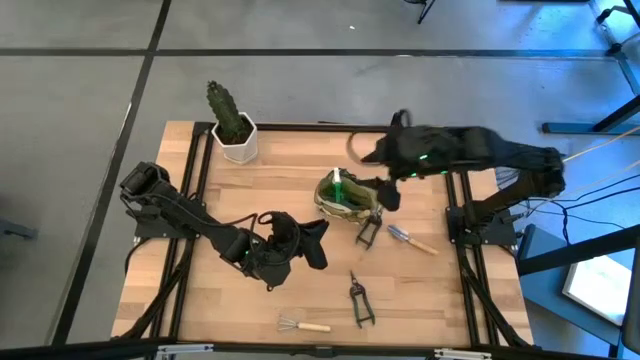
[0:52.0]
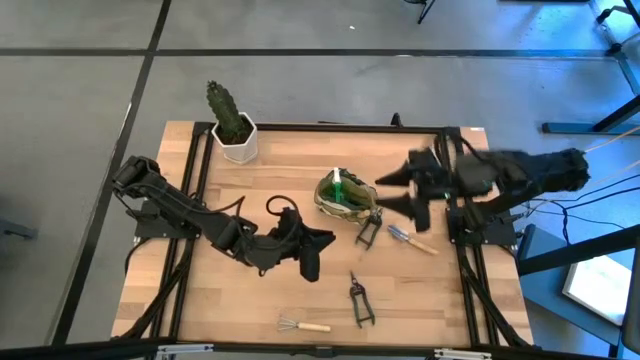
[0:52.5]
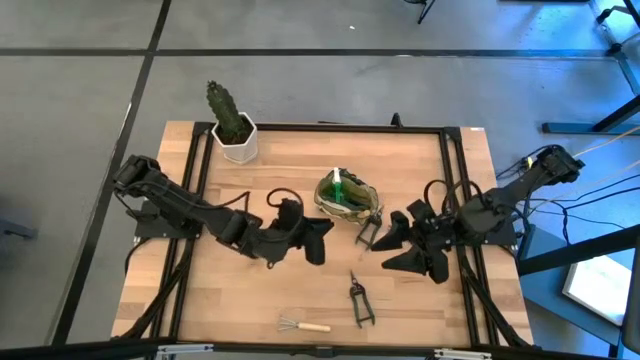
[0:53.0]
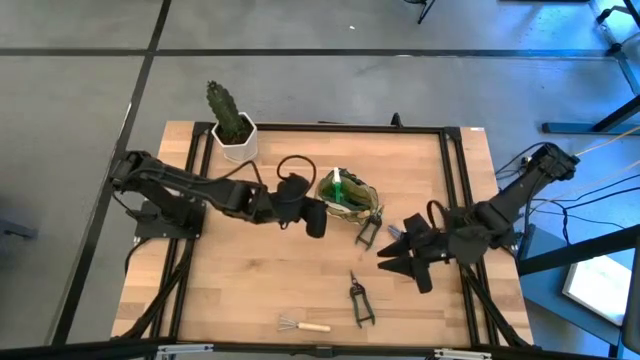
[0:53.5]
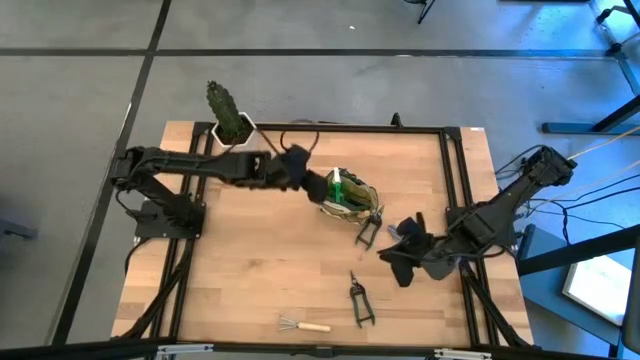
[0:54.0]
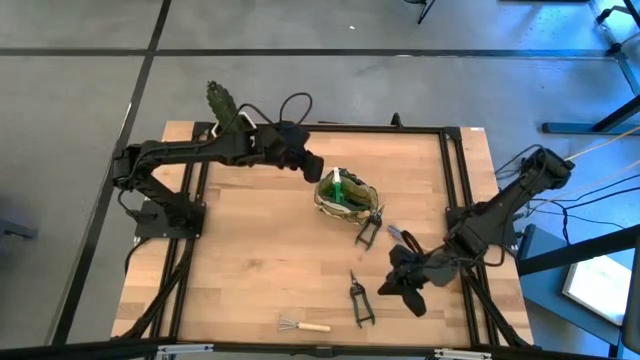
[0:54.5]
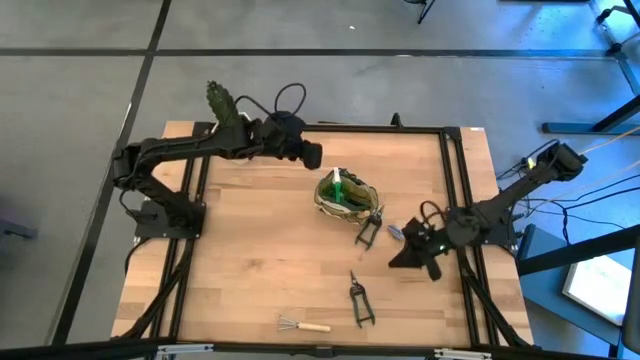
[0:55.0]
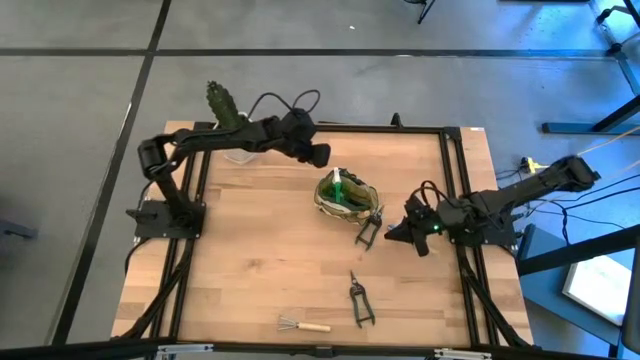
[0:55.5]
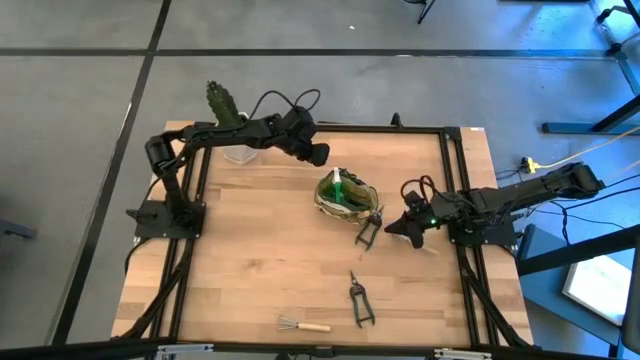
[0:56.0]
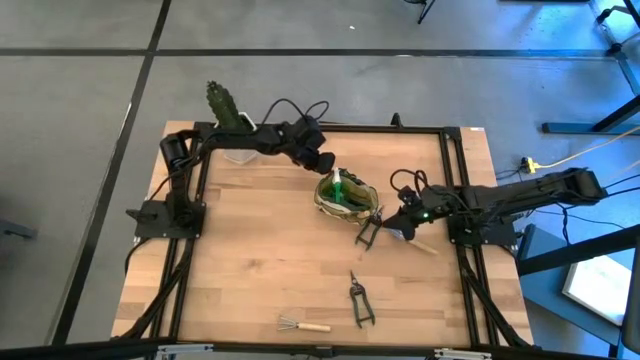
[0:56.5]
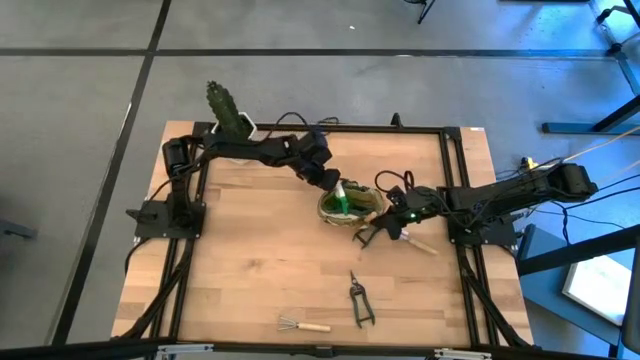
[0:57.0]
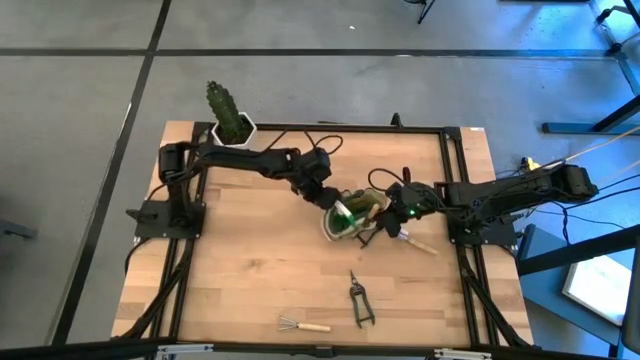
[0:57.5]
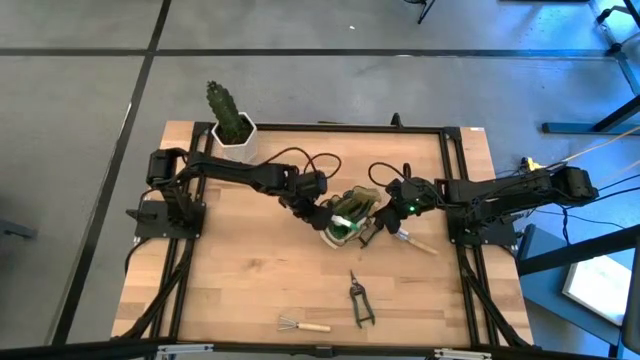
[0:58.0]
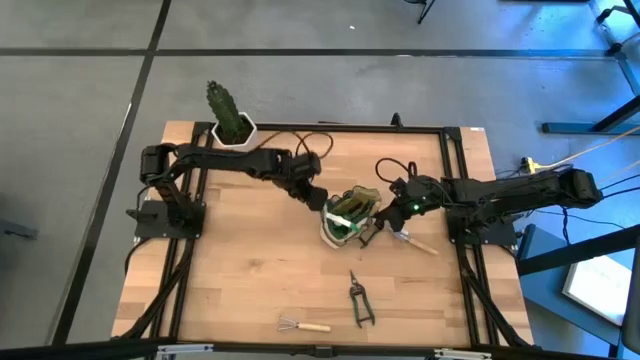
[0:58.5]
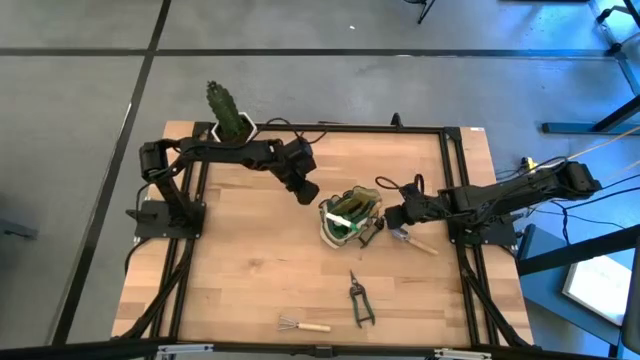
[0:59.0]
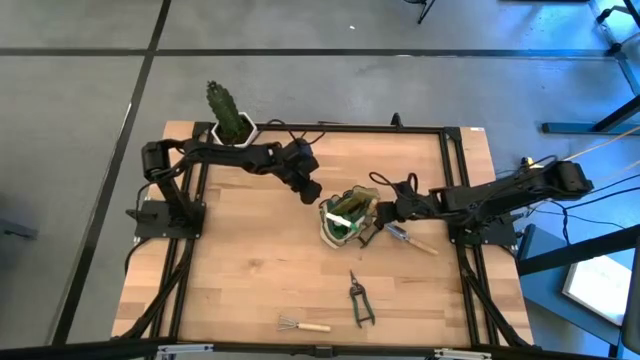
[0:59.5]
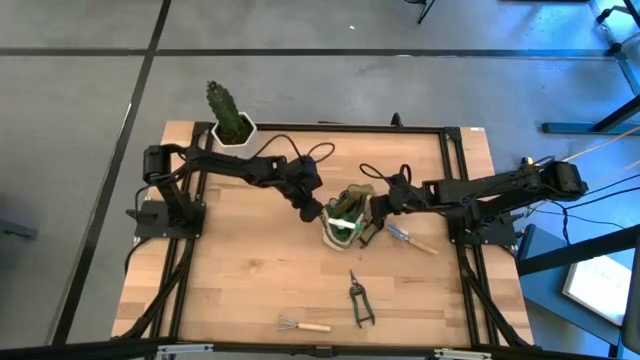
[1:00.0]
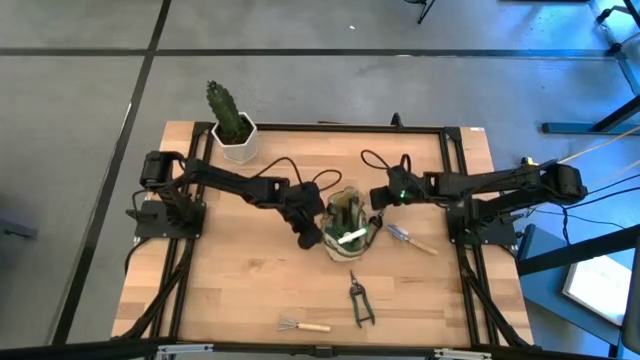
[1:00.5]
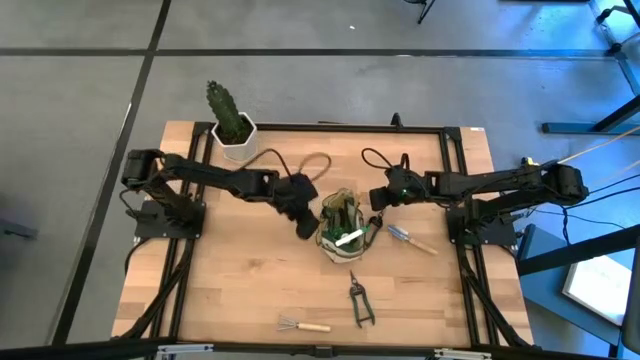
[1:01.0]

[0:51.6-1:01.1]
Task: Pick & Place Garden tools in Gardening bag
Adjust the gardening bag

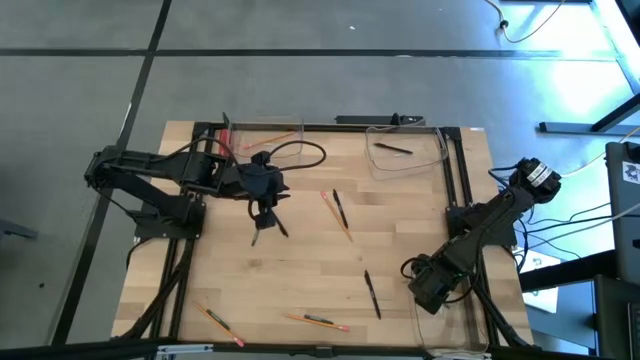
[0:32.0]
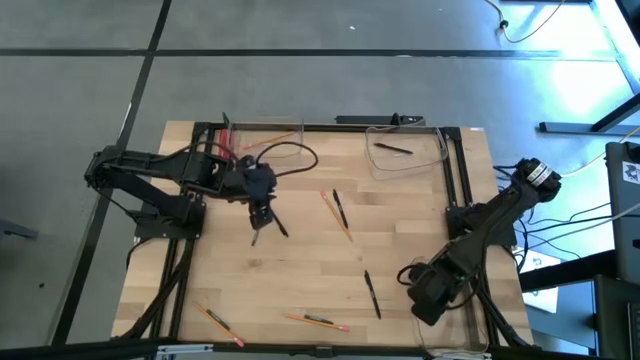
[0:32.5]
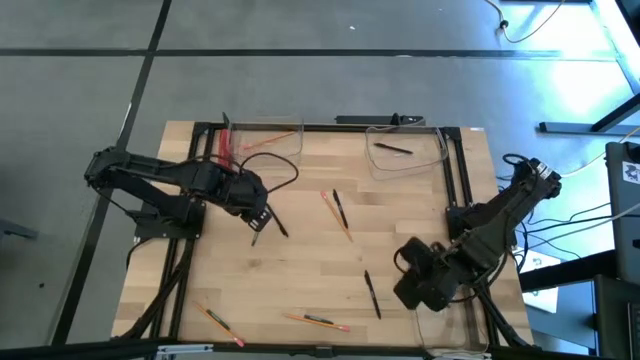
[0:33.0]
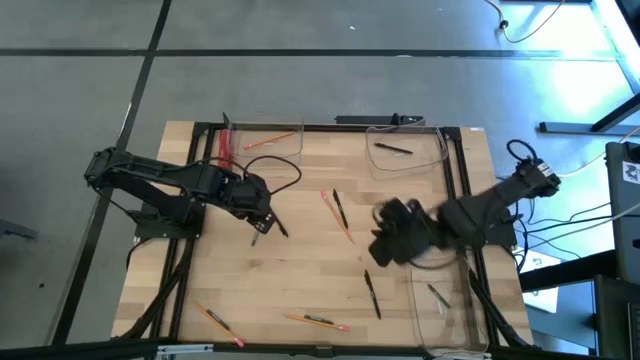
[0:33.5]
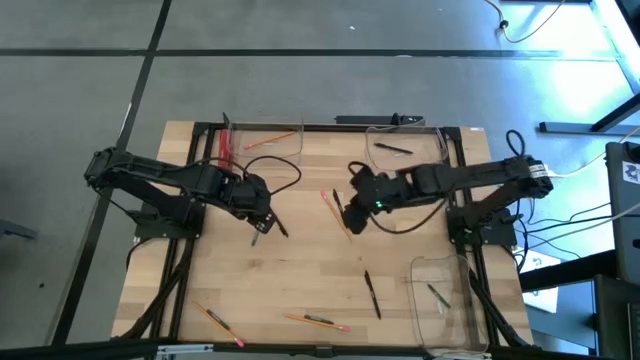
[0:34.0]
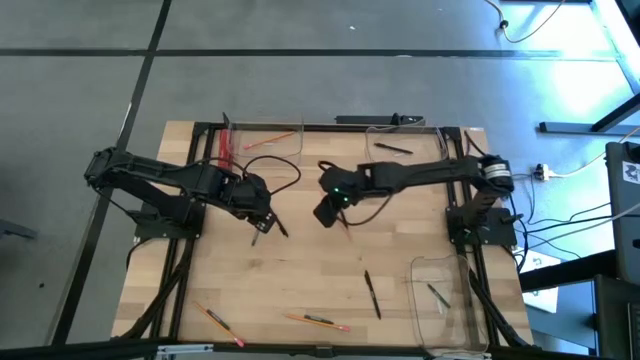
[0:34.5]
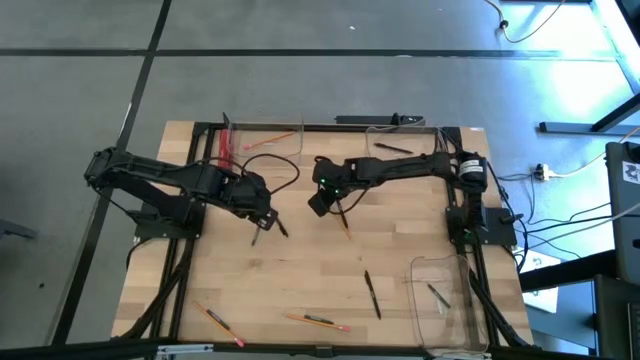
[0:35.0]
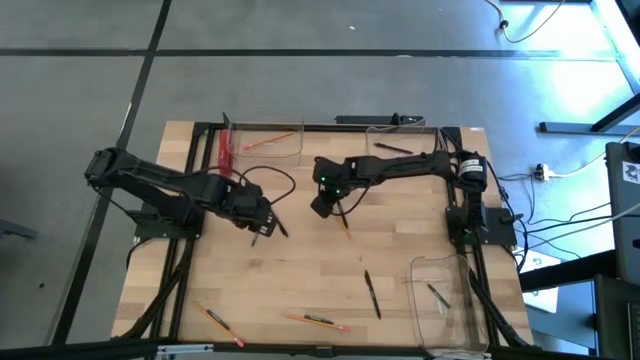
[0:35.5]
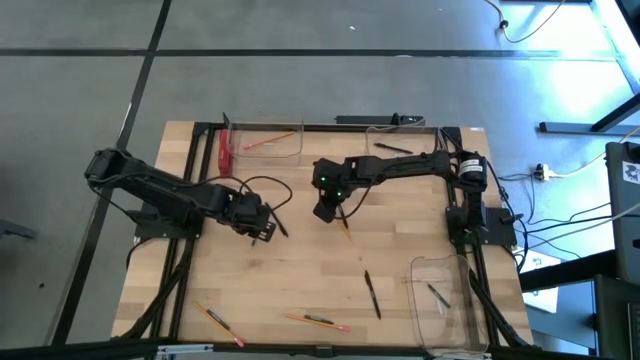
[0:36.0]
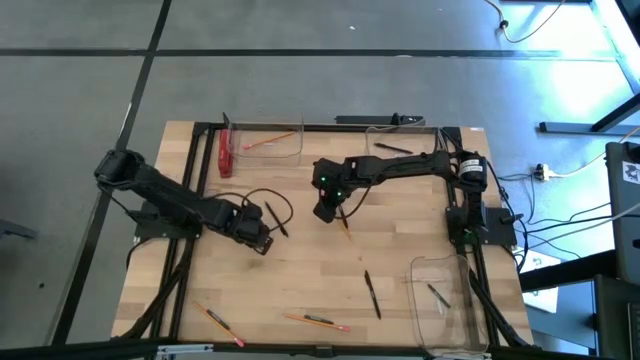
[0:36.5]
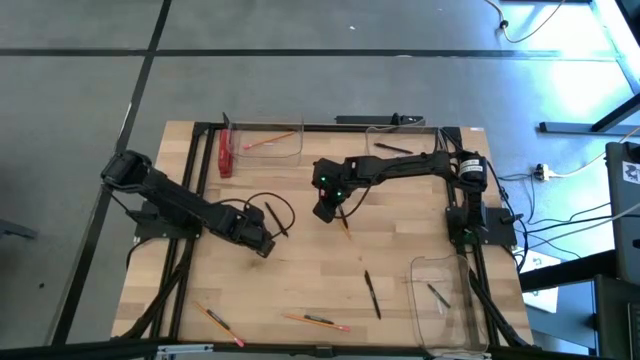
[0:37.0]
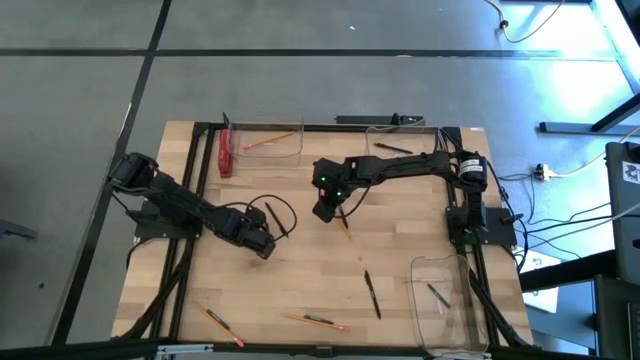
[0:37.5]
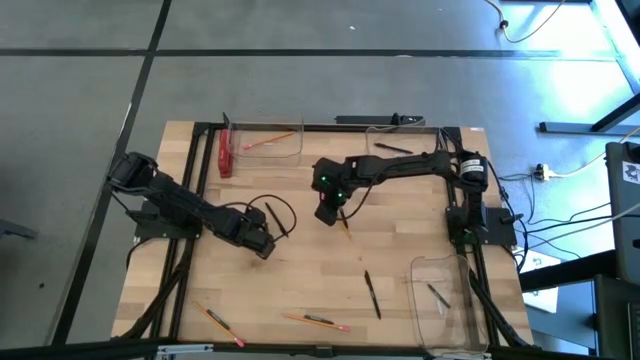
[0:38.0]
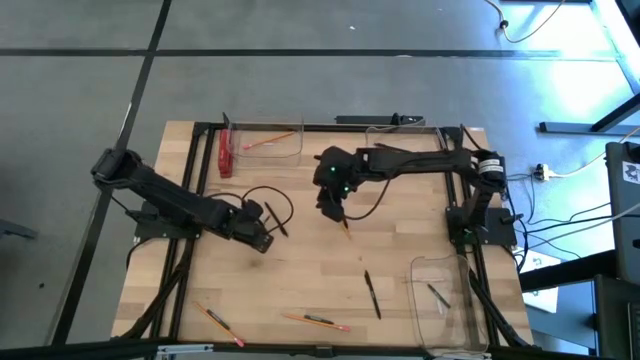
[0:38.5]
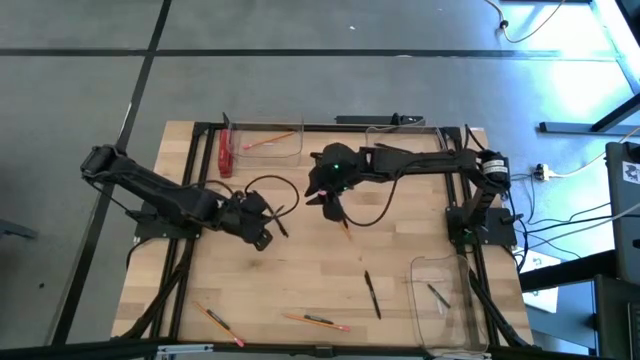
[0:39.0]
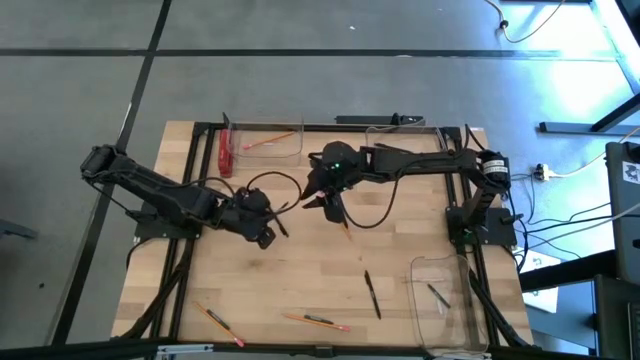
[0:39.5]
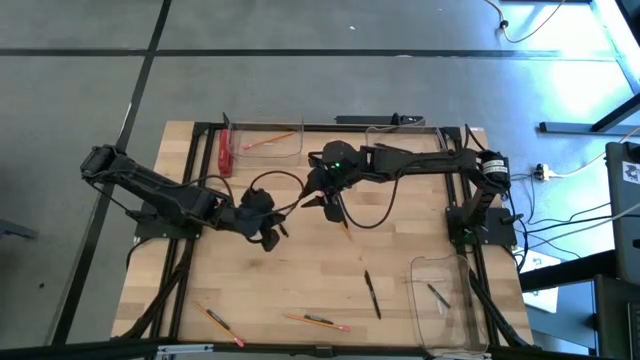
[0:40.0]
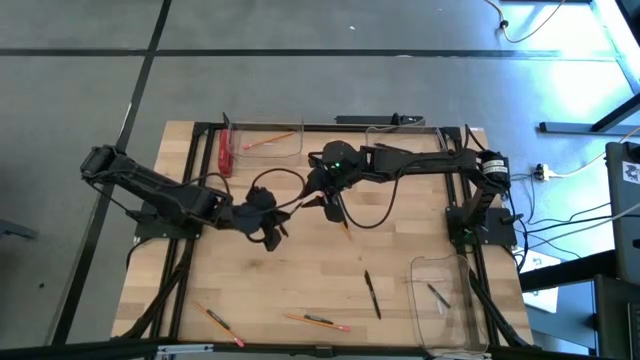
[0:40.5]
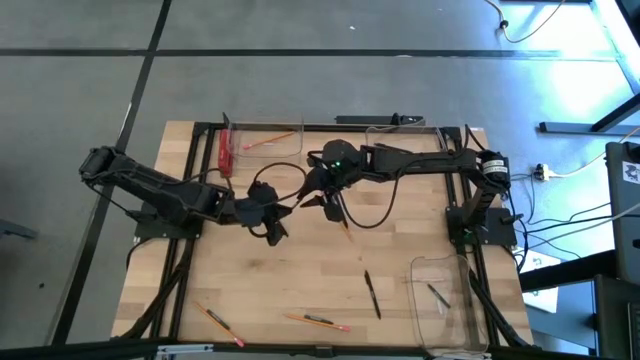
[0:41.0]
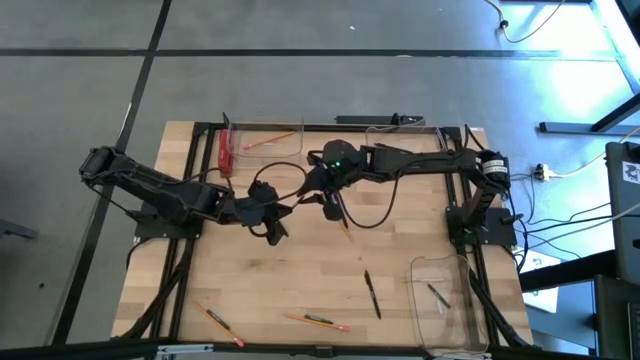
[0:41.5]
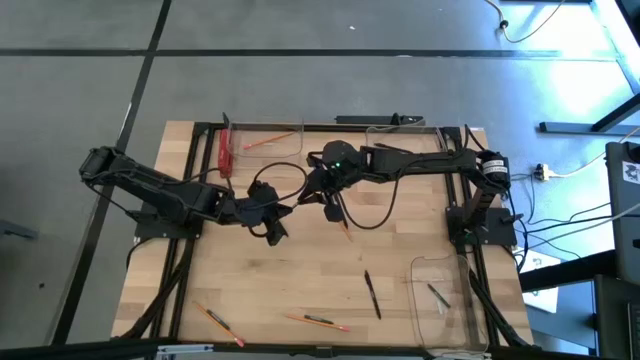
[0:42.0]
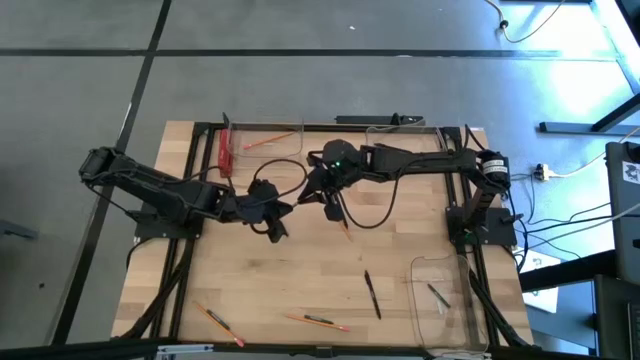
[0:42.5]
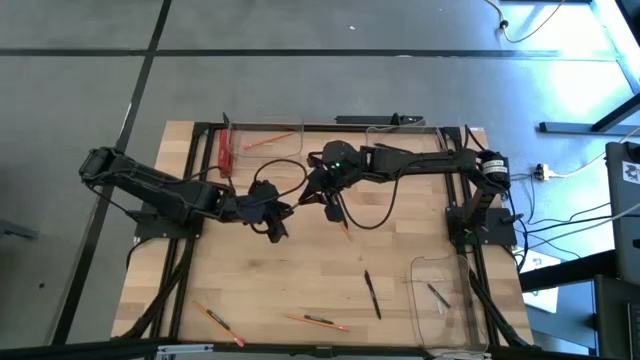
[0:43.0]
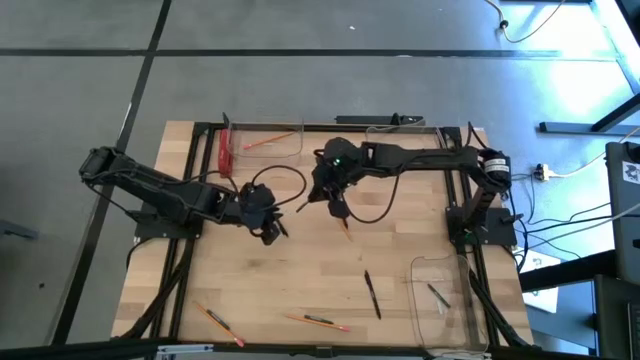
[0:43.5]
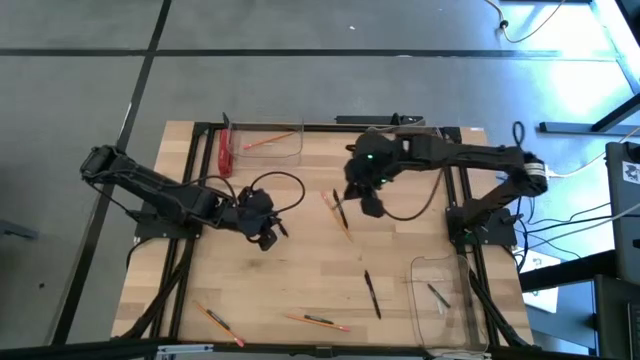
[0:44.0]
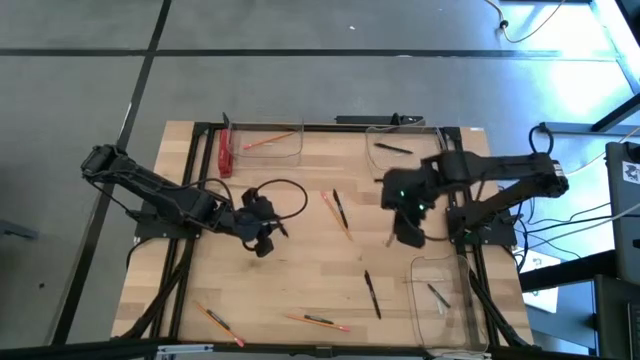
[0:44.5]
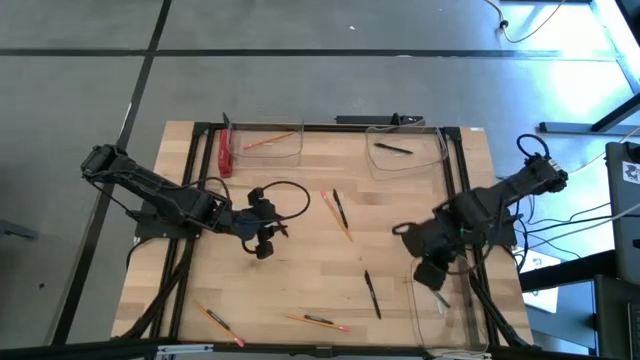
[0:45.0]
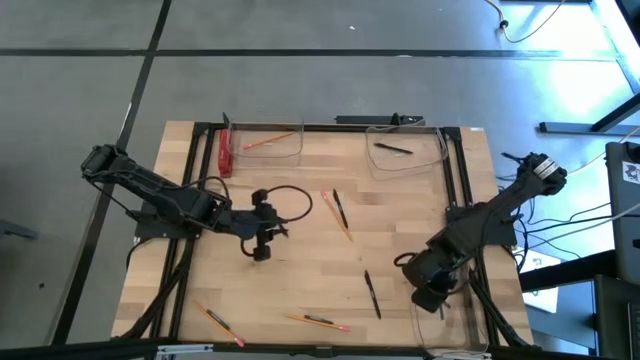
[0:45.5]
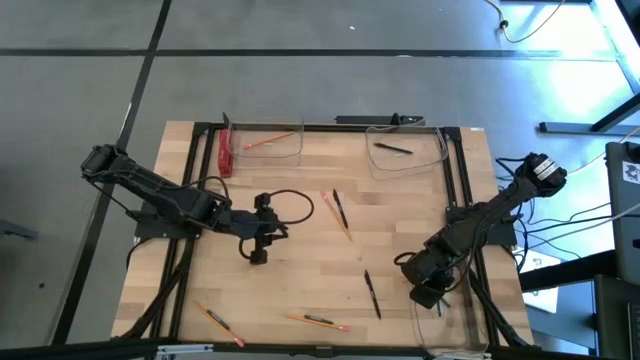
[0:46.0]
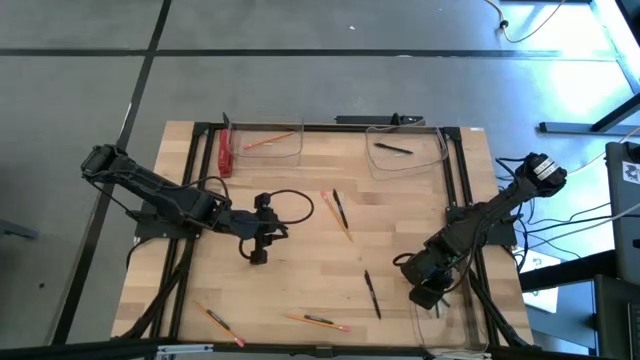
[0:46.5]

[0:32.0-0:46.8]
Task: Sort crayons/erasers/pens/pencils in bins
Put the top left green crayon into the bottom transparent bin
